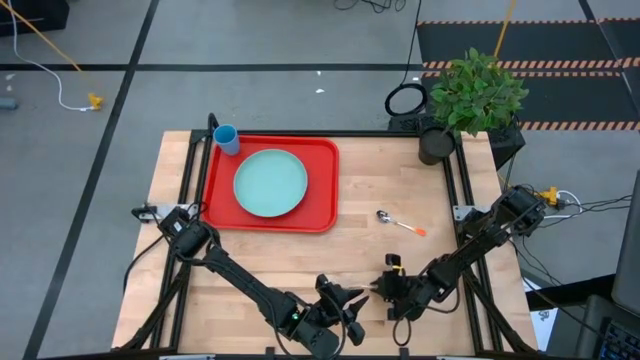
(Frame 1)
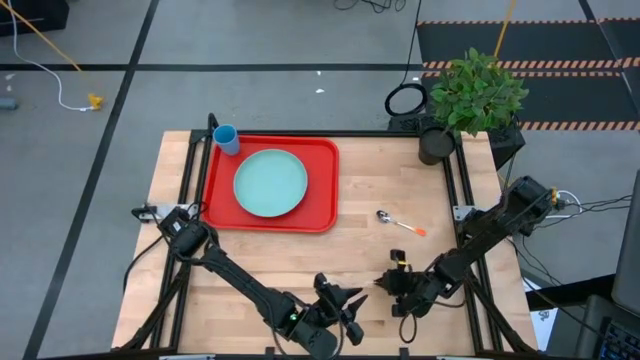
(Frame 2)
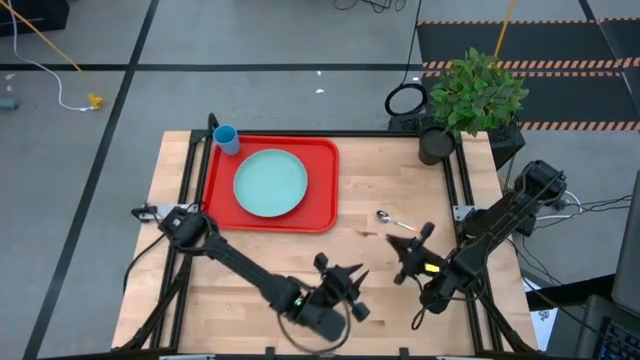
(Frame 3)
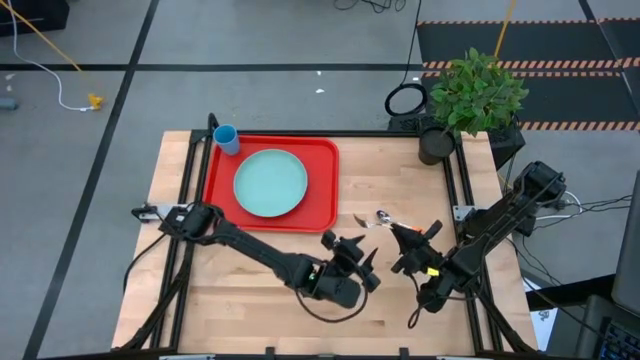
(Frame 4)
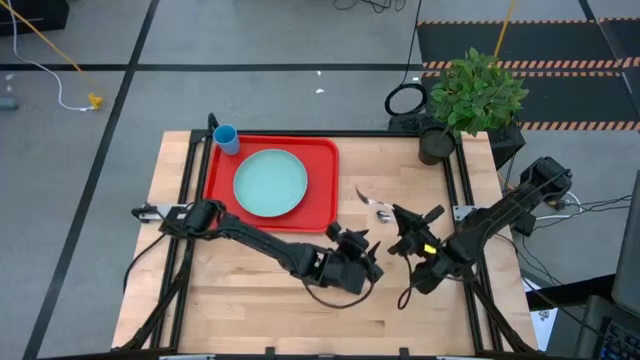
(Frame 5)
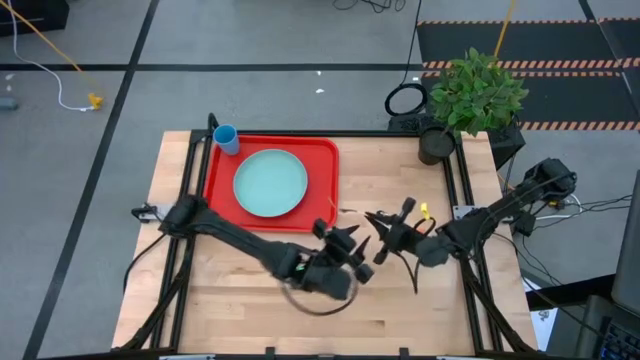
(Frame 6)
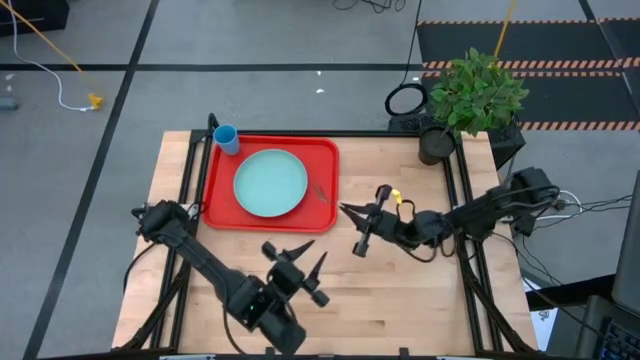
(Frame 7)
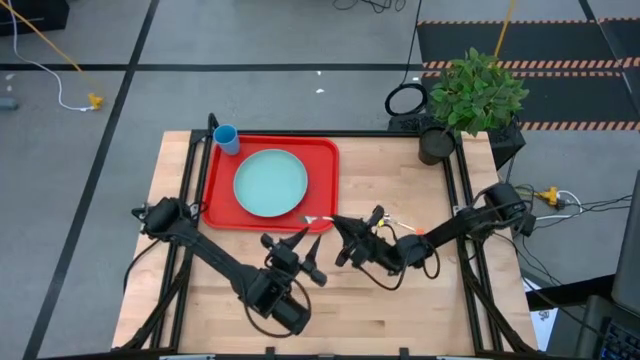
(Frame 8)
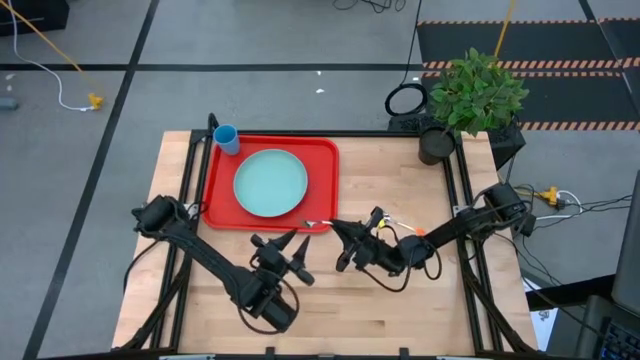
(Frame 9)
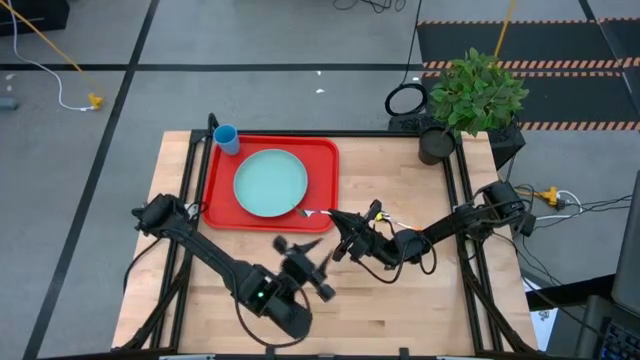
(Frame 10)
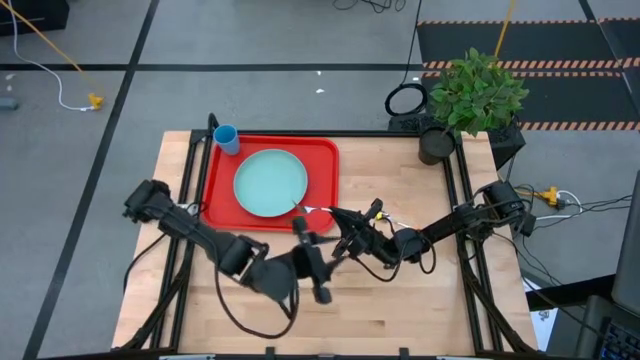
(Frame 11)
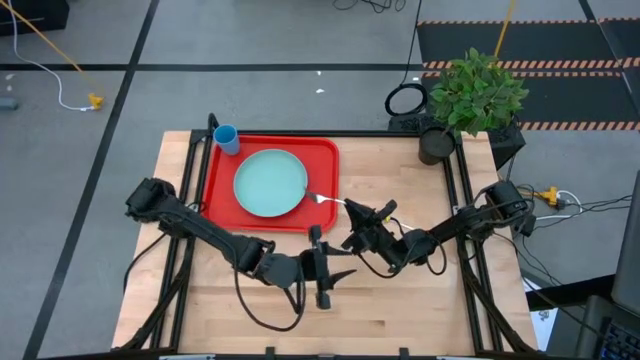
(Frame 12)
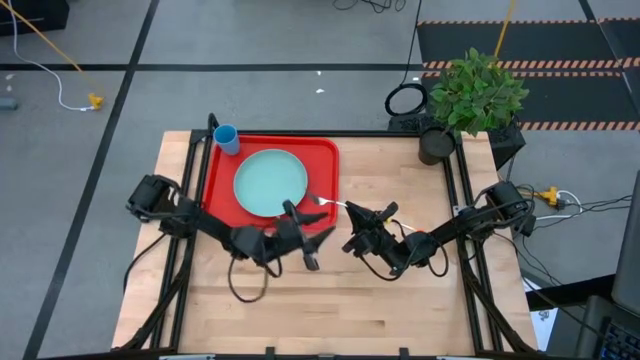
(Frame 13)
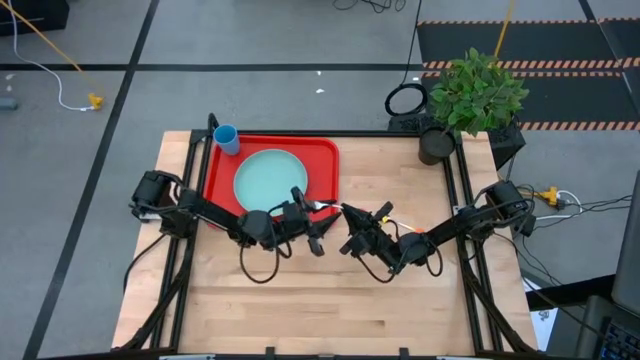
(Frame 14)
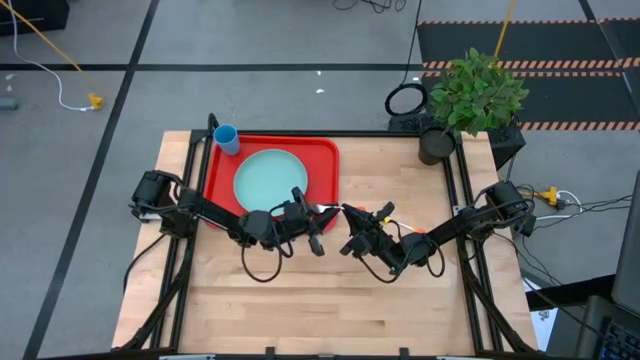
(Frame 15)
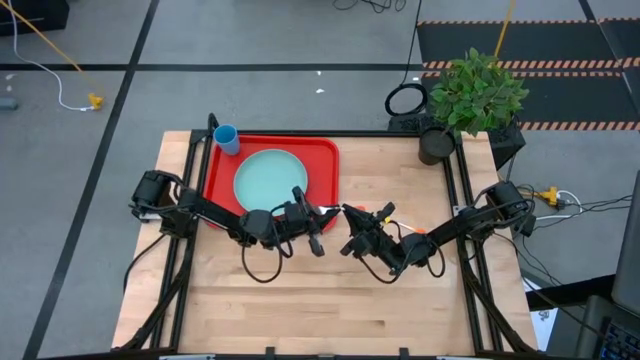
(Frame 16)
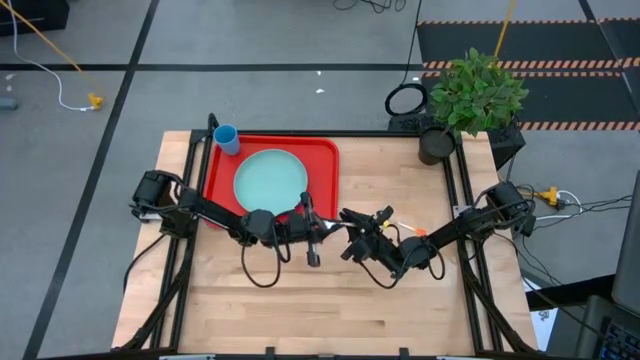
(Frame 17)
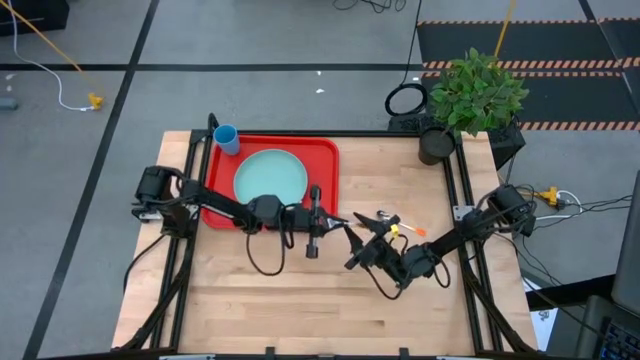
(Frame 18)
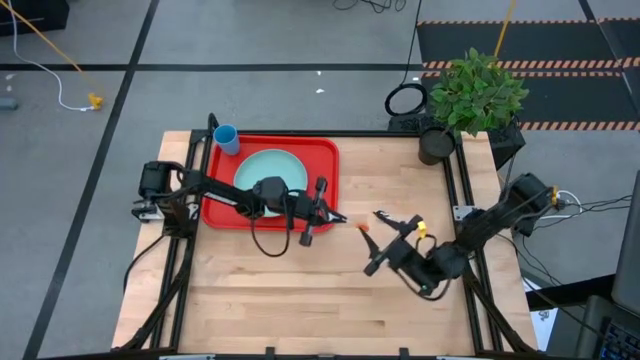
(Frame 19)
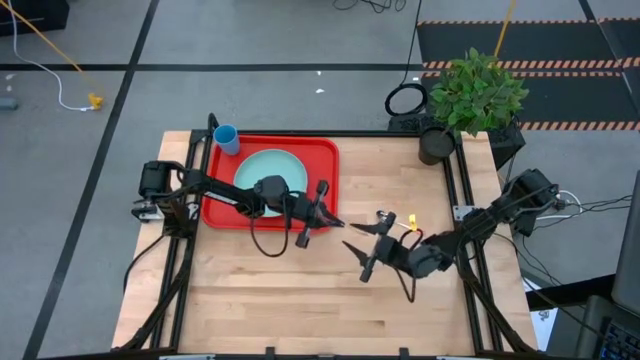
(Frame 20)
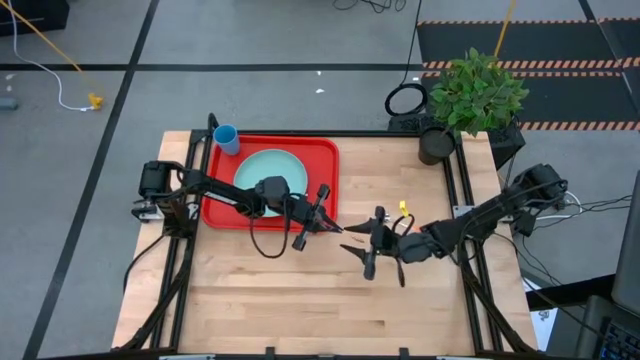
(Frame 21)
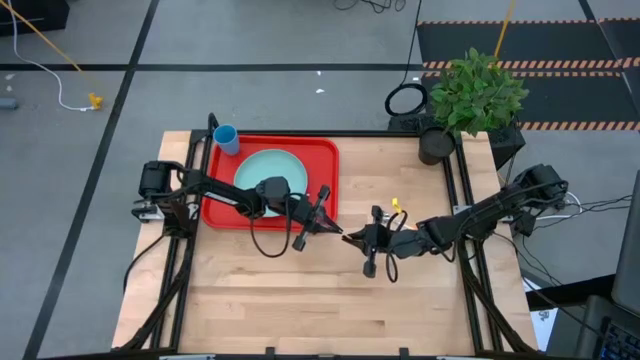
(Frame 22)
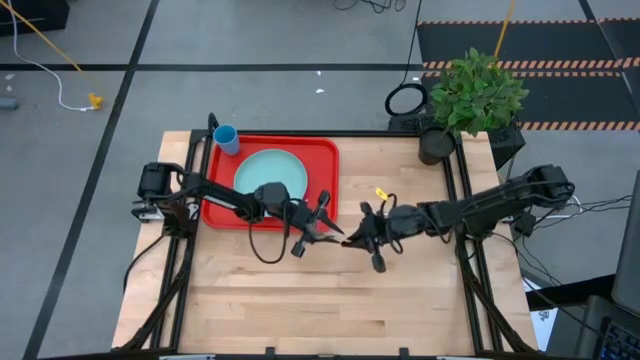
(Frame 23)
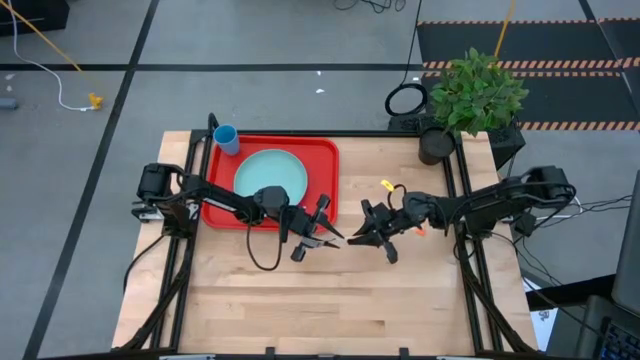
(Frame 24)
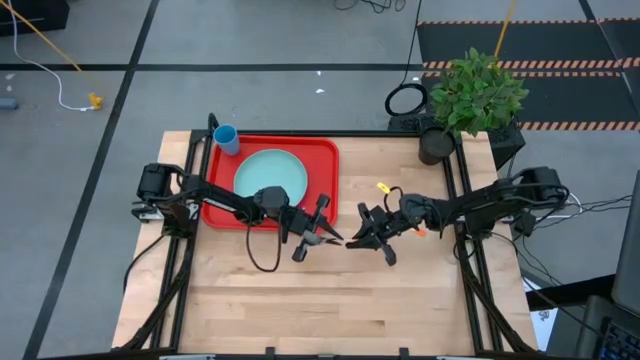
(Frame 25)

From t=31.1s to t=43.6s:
Task: Pick and place plate/cup/fork/spoon on tray
Put the orange fork on the red serving tray to the right of the blue plate

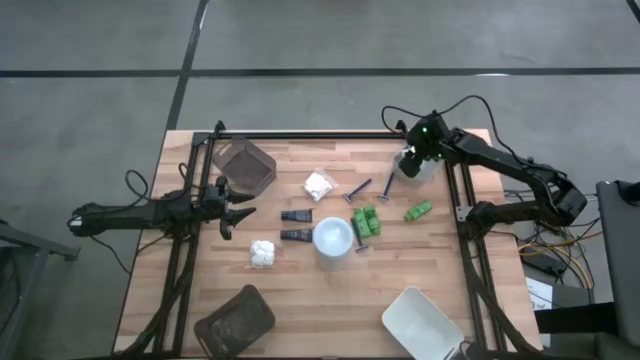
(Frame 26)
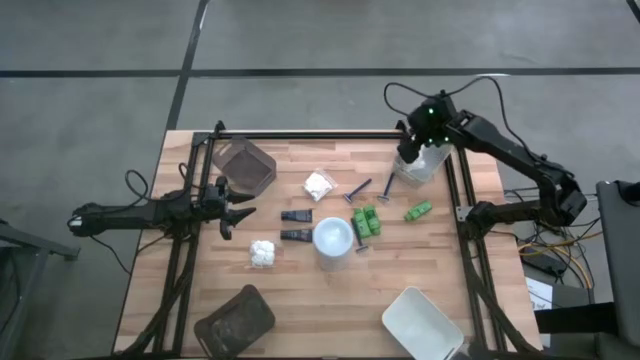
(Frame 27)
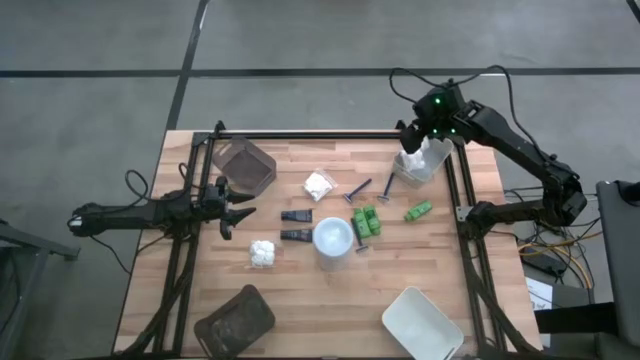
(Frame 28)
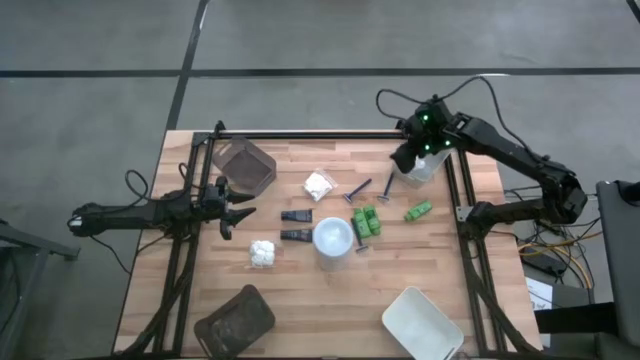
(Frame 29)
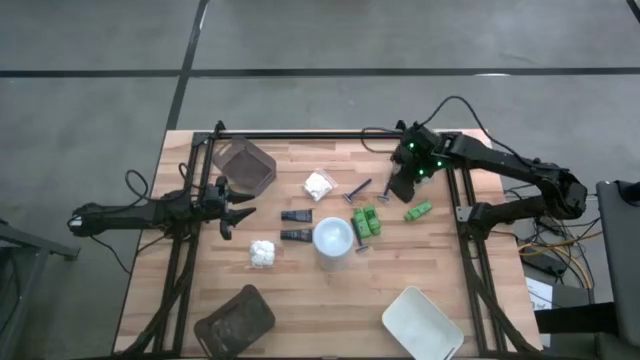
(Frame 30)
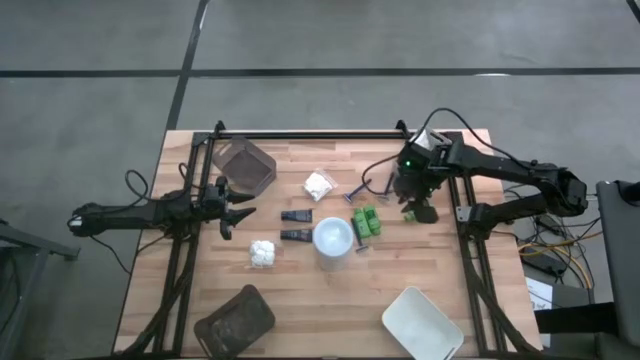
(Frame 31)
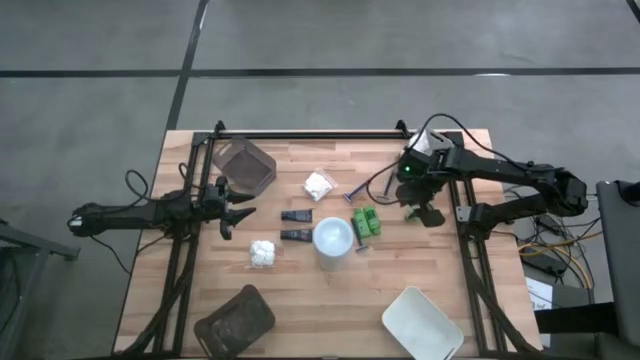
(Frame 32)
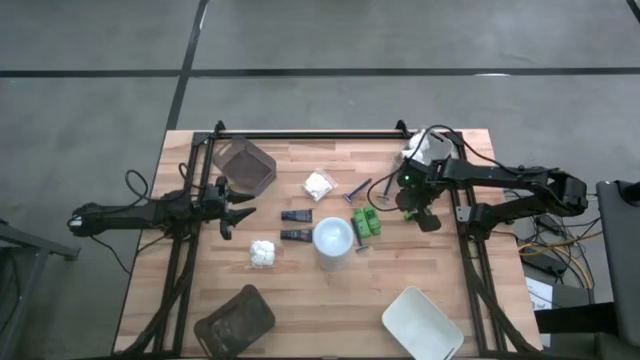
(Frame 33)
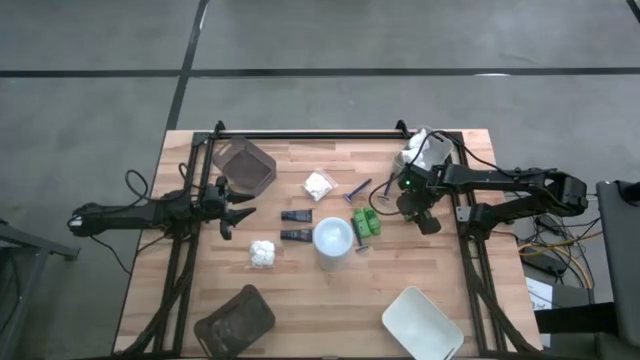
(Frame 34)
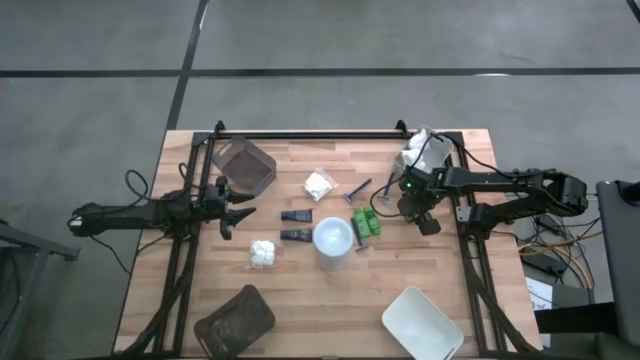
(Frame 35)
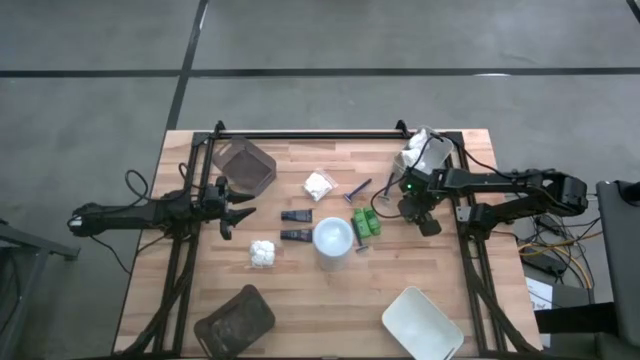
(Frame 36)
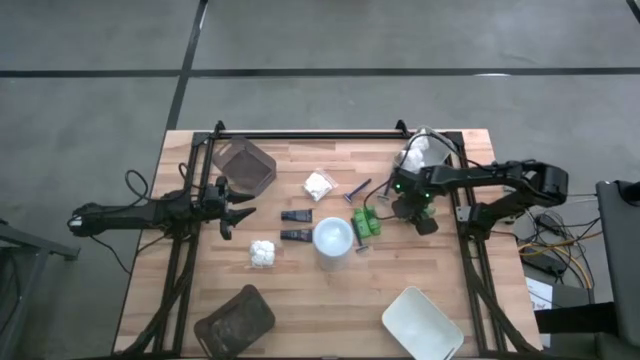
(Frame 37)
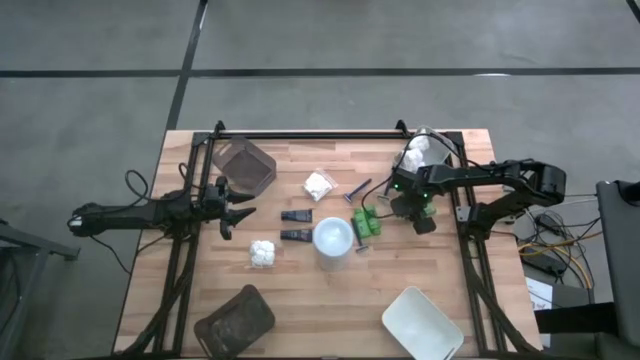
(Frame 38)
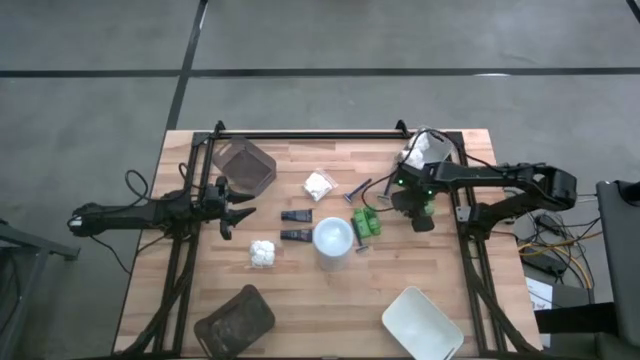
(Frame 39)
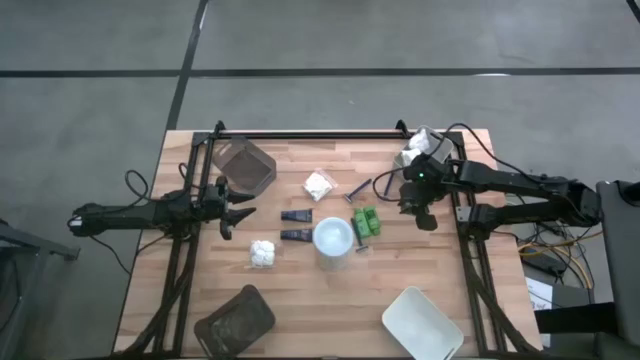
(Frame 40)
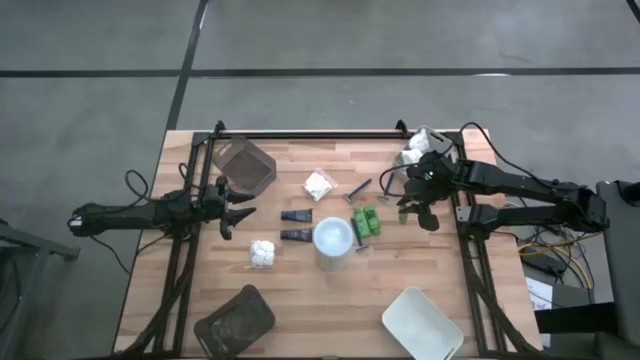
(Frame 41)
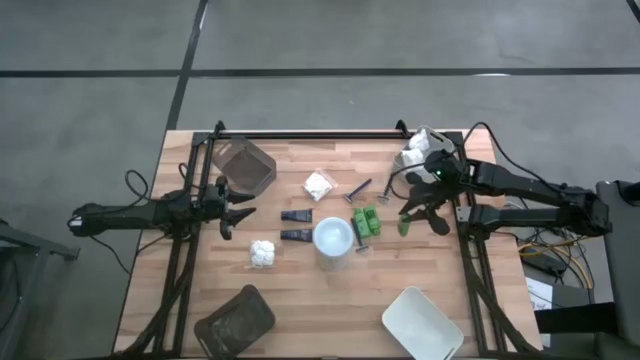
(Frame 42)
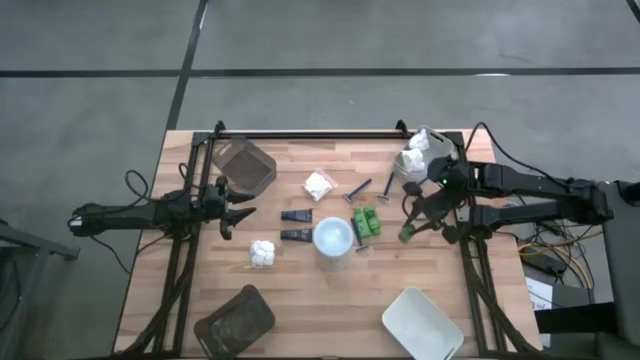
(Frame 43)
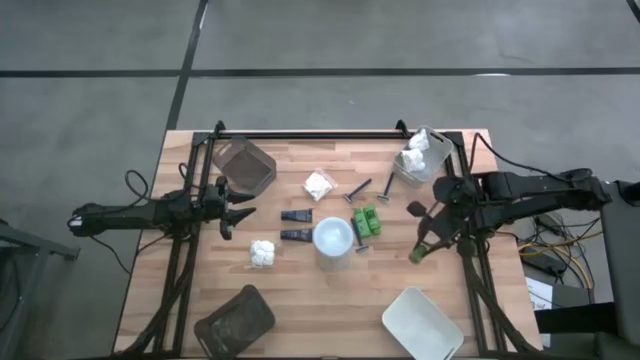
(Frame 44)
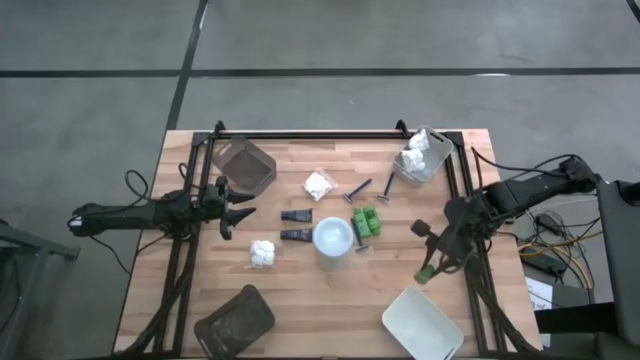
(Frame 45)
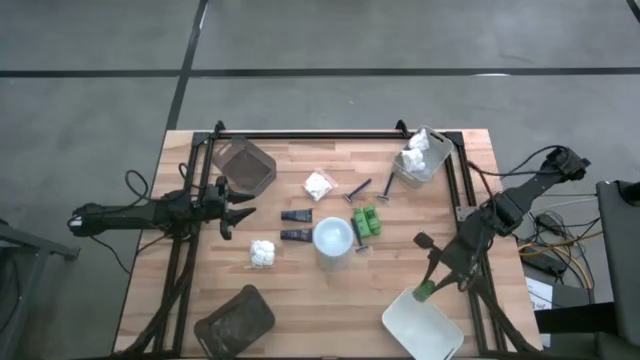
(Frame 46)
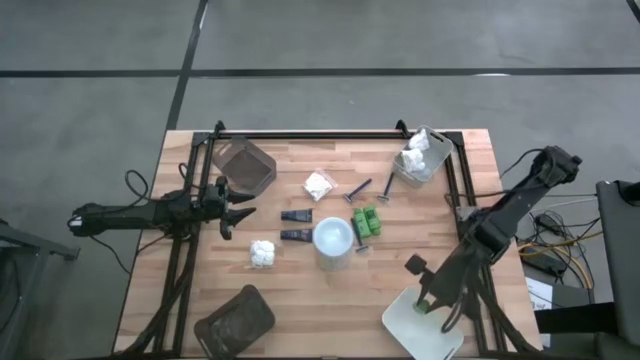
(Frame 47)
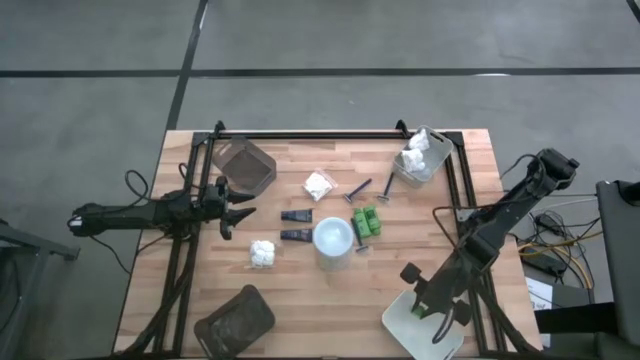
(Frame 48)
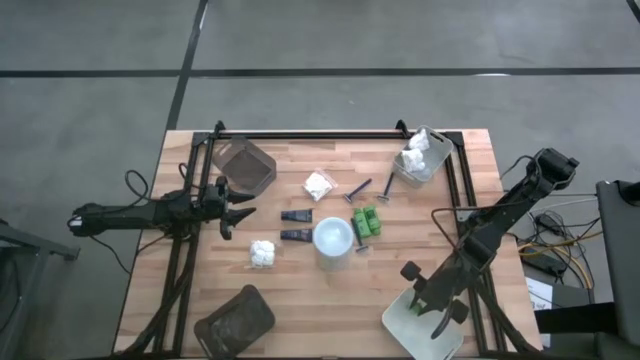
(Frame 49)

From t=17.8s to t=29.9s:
Task: Pick & Place Travel size toiletries
Put the green shampoo into the white bin
